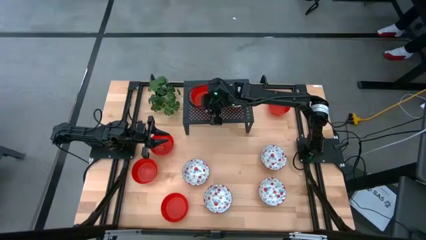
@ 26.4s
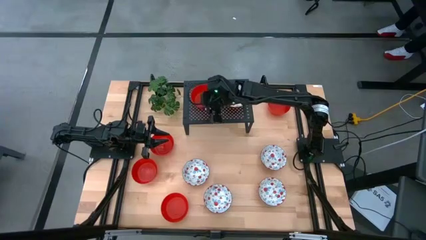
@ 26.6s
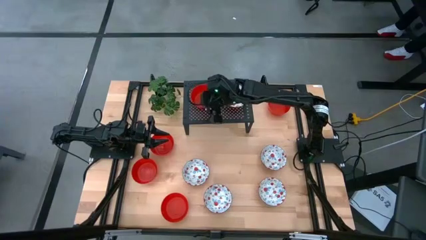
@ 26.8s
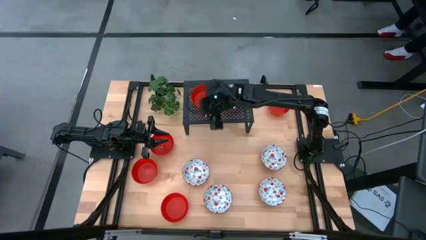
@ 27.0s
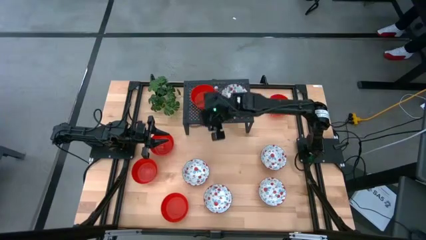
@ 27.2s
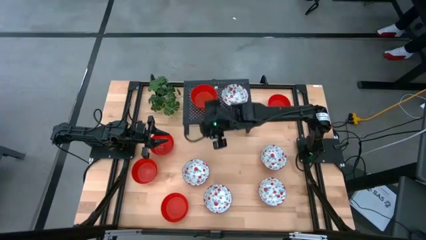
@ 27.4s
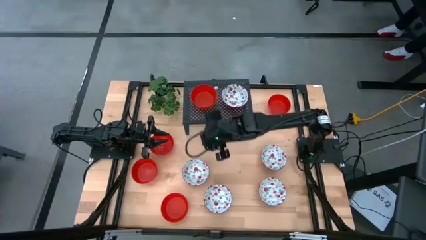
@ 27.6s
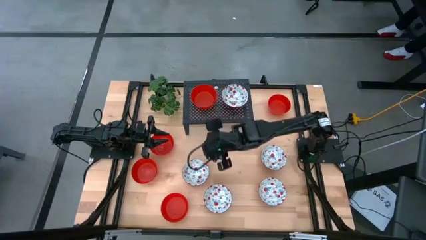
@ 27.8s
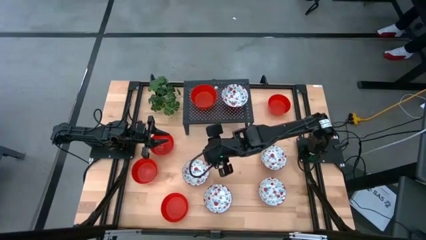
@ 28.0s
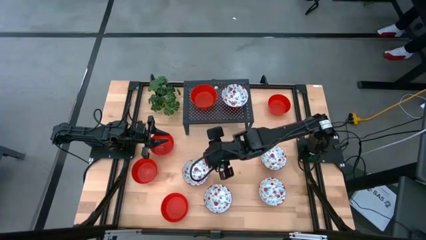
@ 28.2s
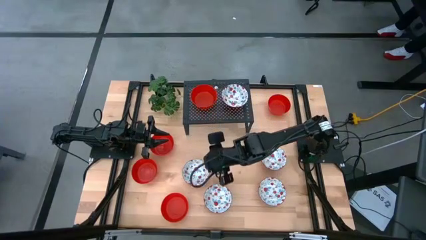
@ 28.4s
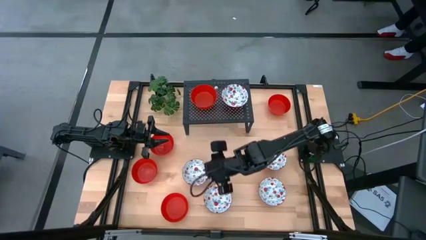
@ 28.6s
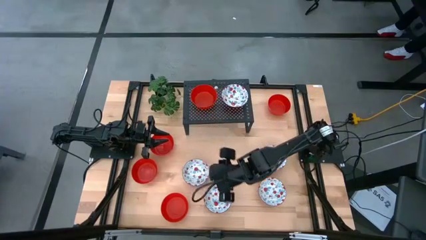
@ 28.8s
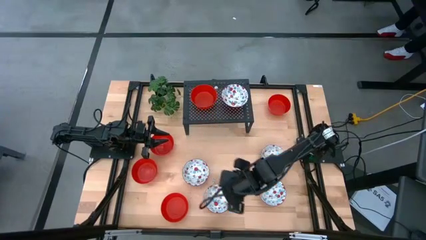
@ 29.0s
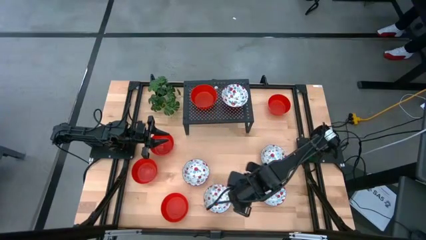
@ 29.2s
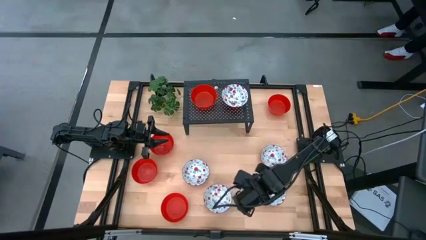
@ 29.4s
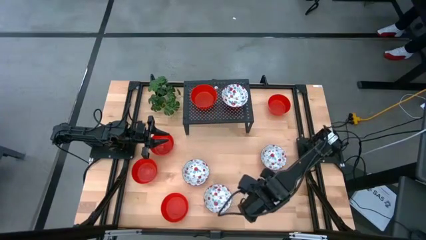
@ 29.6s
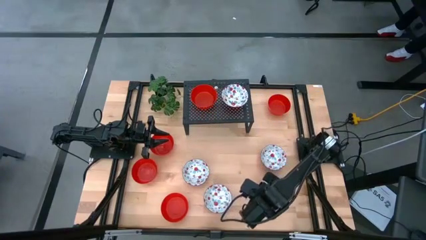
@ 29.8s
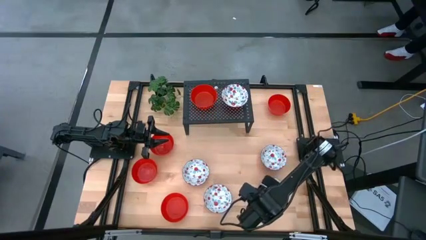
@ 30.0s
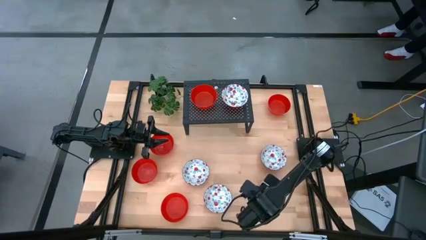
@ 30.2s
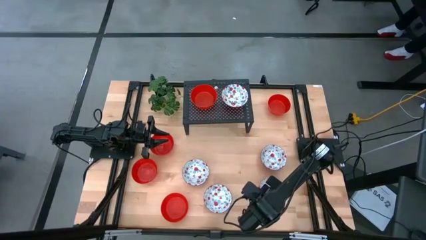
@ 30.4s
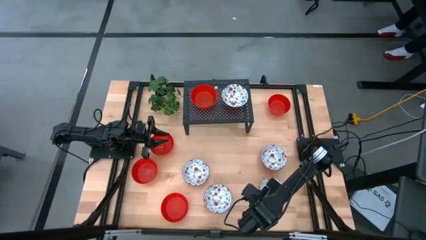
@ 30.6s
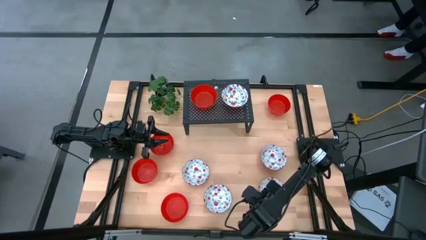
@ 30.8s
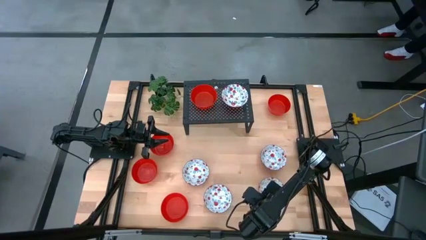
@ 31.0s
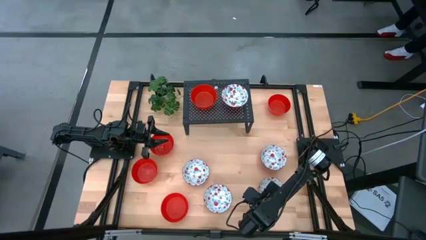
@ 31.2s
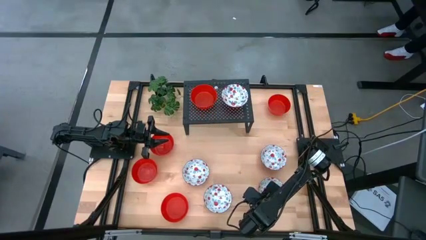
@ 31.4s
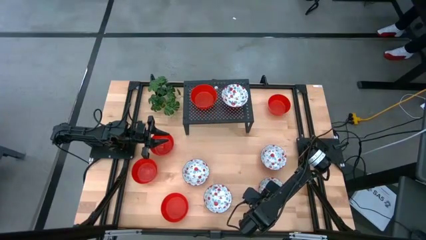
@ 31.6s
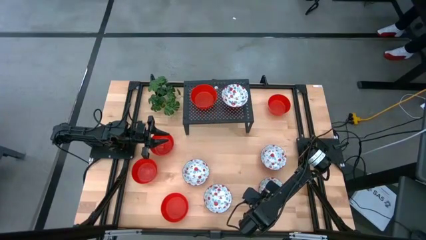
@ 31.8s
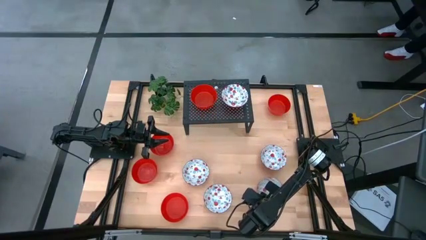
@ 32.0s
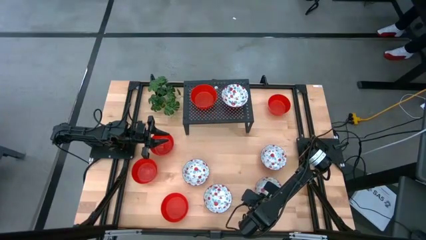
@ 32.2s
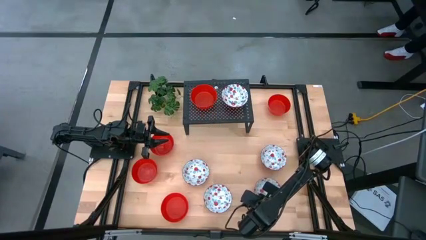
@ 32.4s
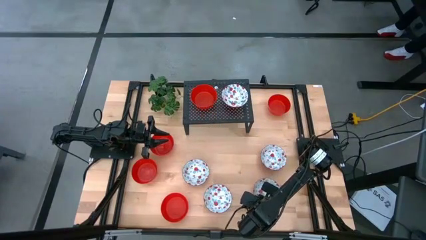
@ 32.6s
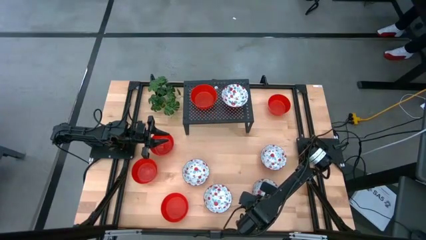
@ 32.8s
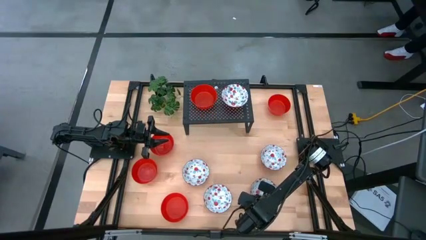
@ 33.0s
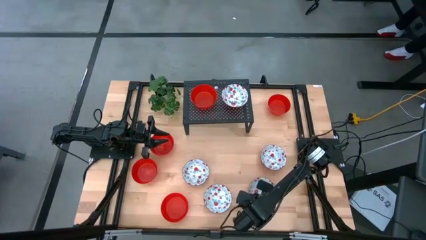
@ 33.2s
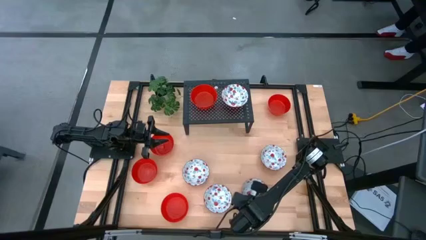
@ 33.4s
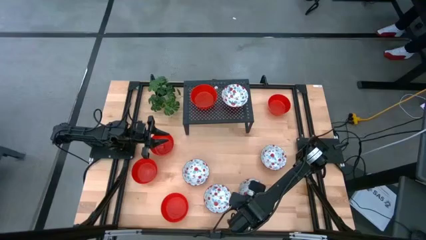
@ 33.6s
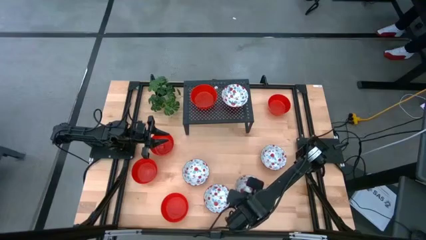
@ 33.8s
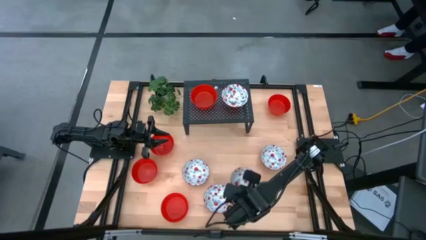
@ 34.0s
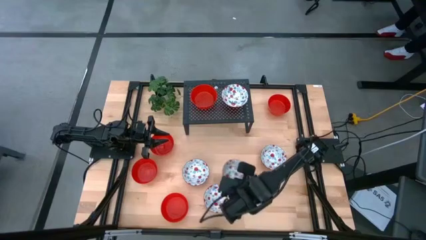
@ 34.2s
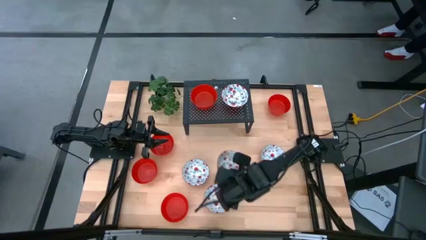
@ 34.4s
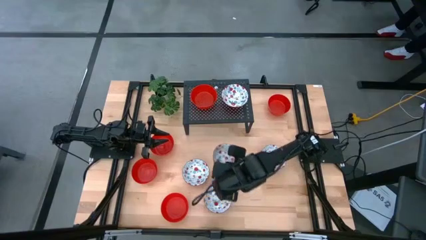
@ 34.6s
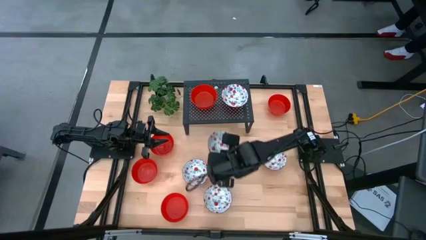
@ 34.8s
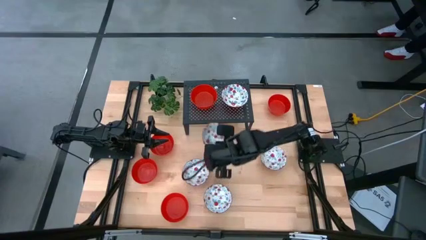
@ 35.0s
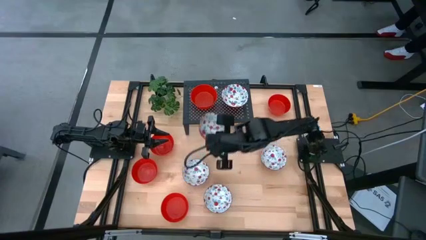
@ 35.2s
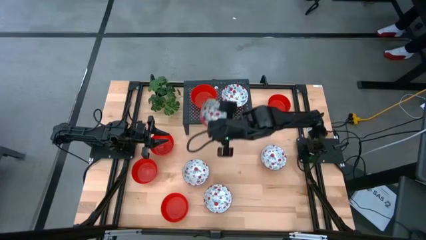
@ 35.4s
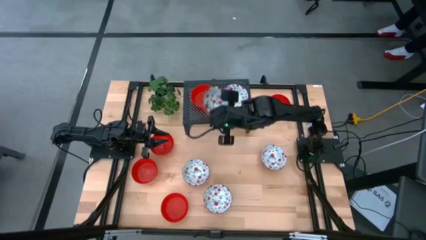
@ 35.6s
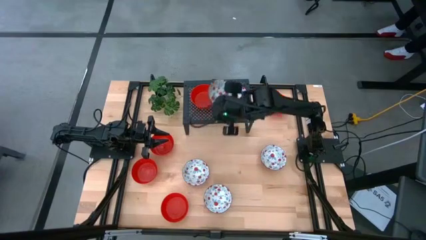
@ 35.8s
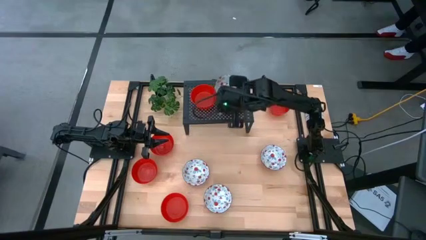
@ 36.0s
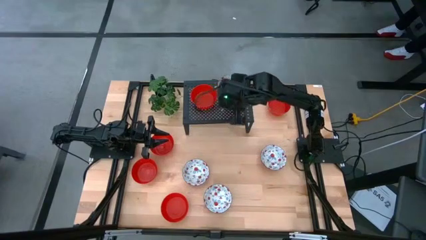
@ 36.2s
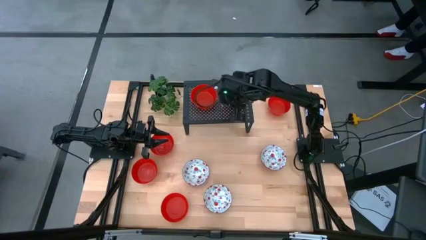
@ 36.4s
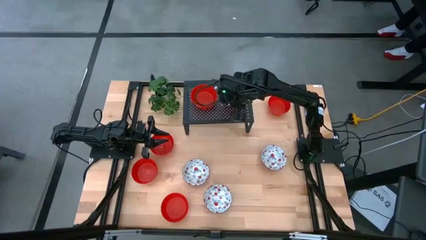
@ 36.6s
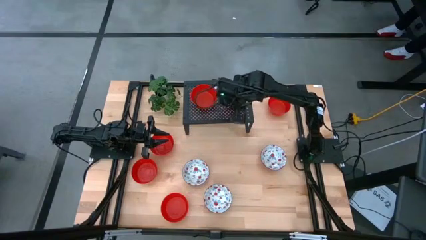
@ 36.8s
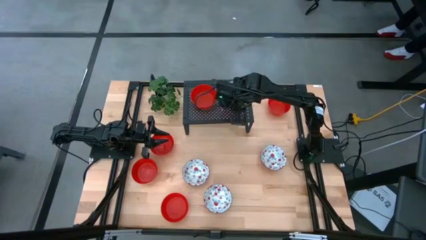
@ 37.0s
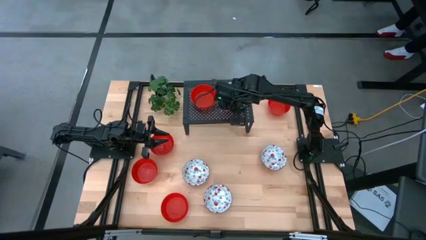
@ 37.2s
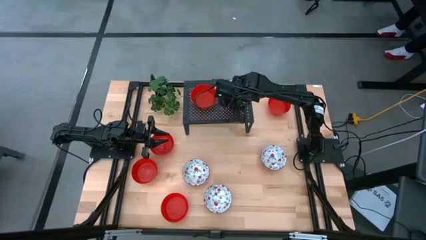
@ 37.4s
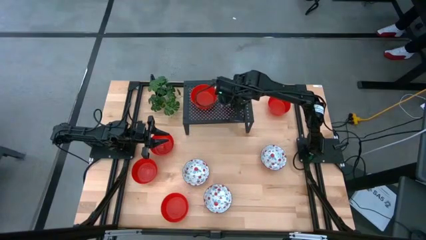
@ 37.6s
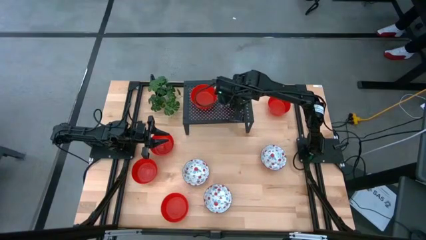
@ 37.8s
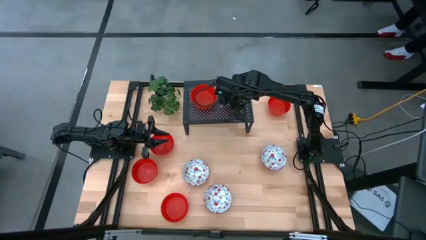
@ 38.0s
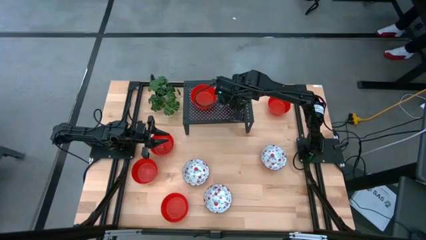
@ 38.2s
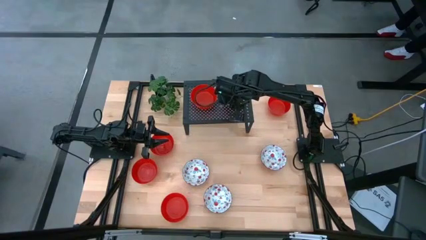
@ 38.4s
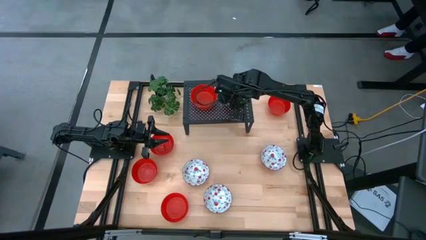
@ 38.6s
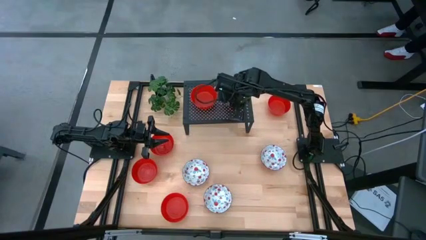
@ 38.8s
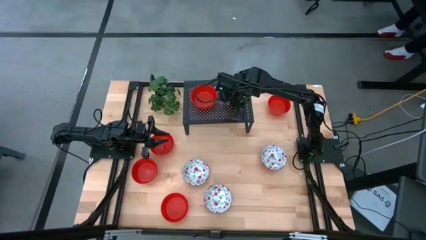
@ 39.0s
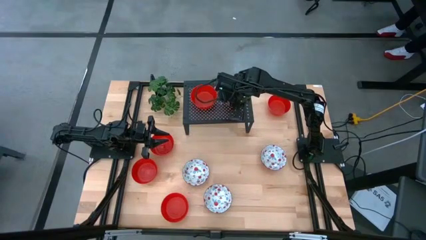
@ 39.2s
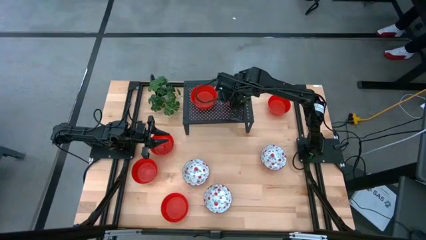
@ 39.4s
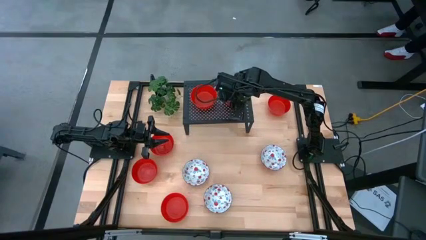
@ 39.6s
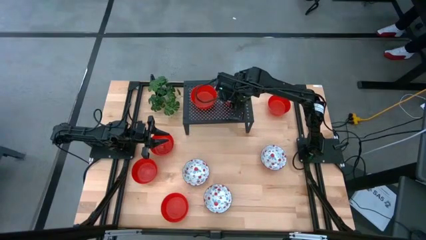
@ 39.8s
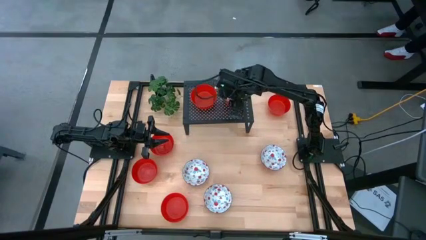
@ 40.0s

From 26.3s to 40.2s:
Task: Pick & Place Mini bowls
Stack the white bowl on the top of the white bowl on the shelf
